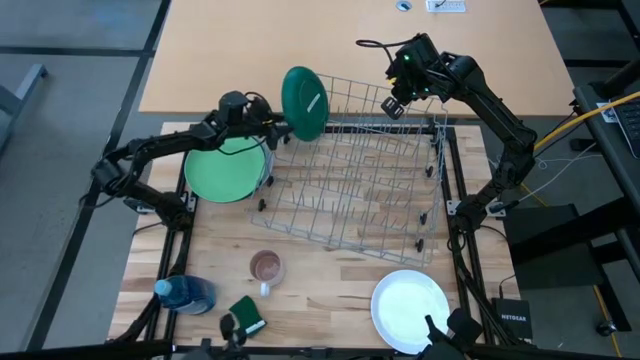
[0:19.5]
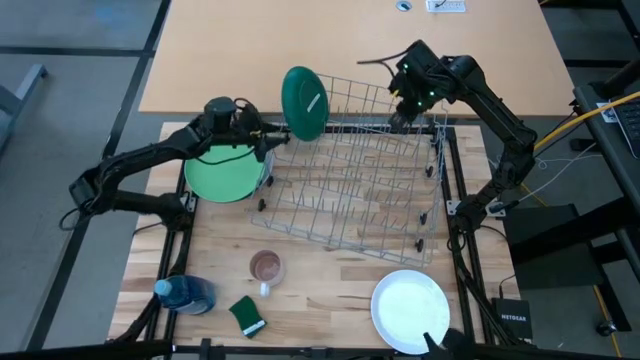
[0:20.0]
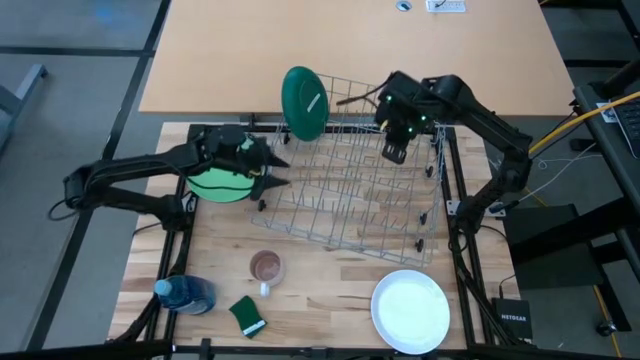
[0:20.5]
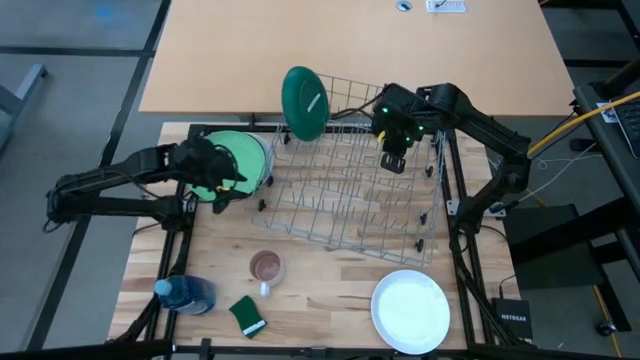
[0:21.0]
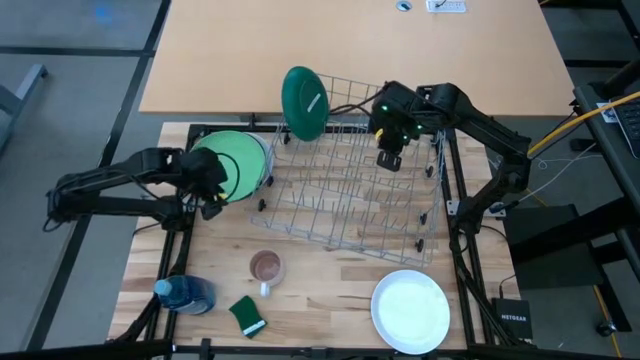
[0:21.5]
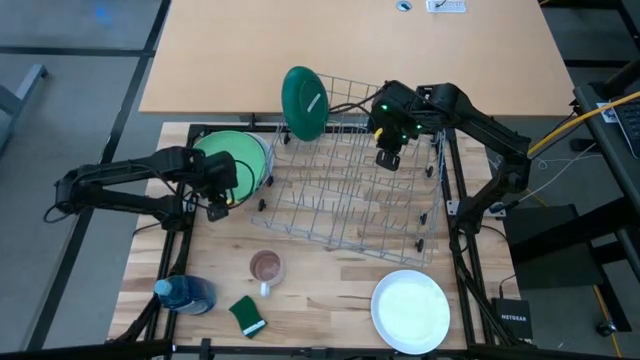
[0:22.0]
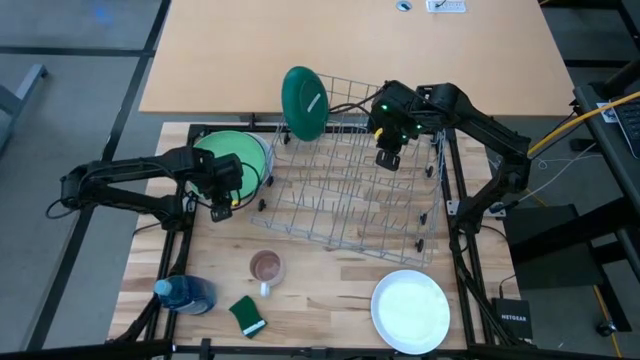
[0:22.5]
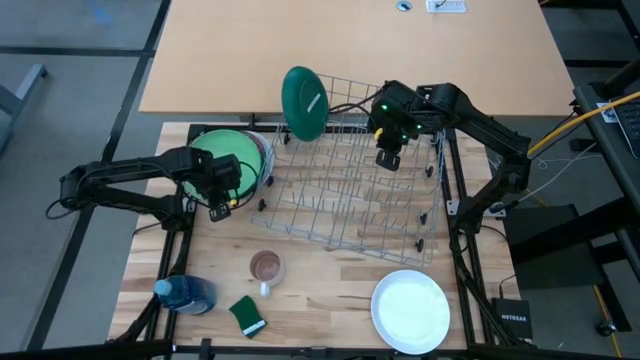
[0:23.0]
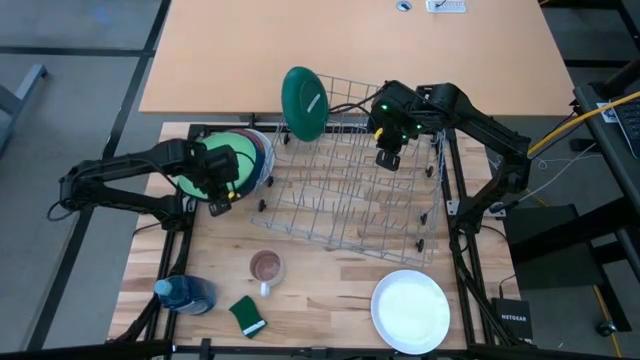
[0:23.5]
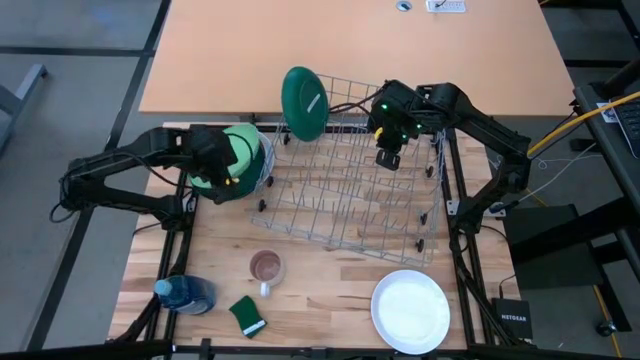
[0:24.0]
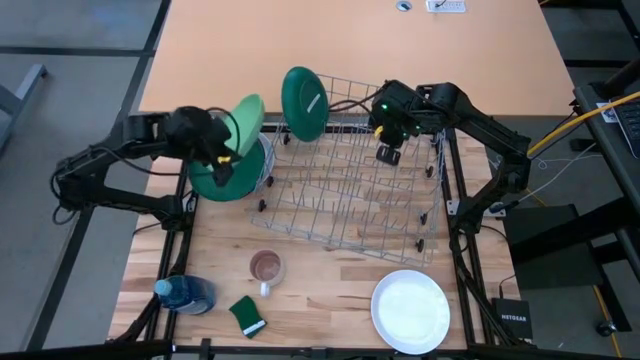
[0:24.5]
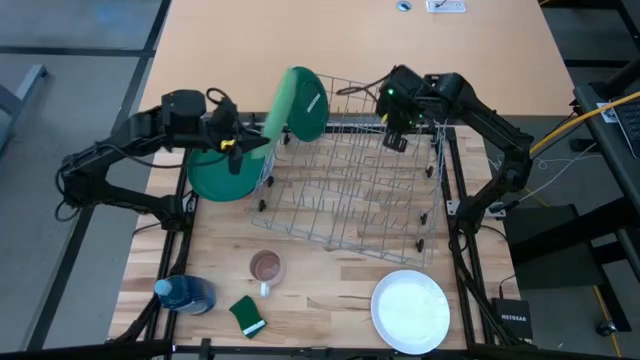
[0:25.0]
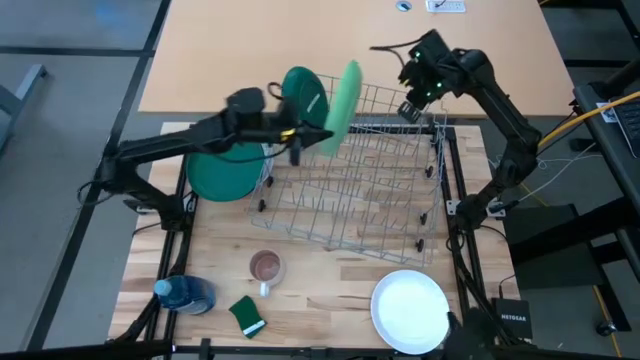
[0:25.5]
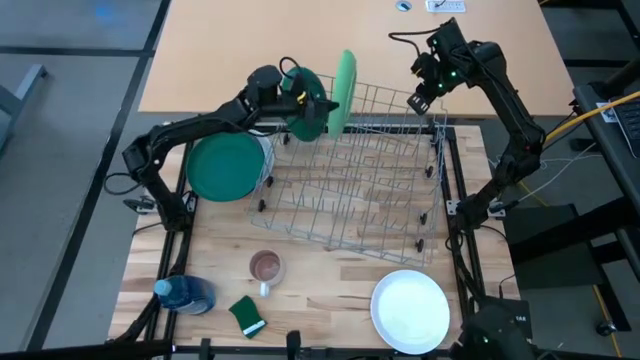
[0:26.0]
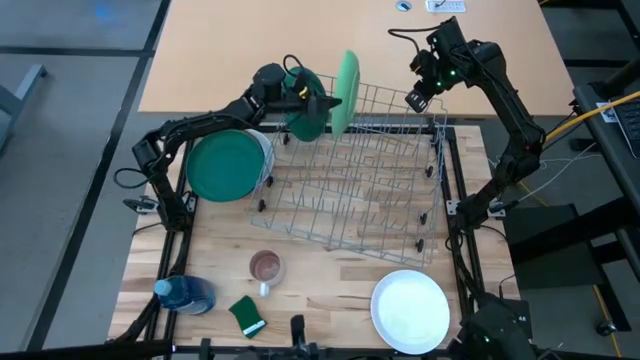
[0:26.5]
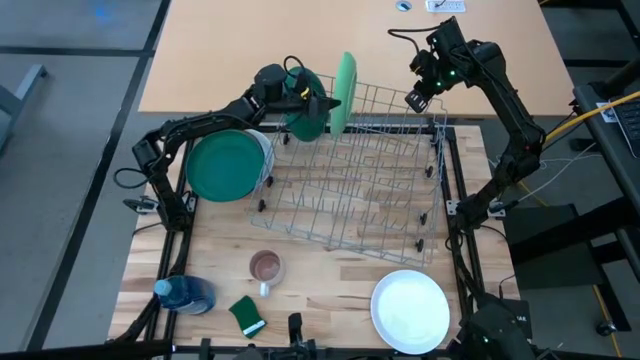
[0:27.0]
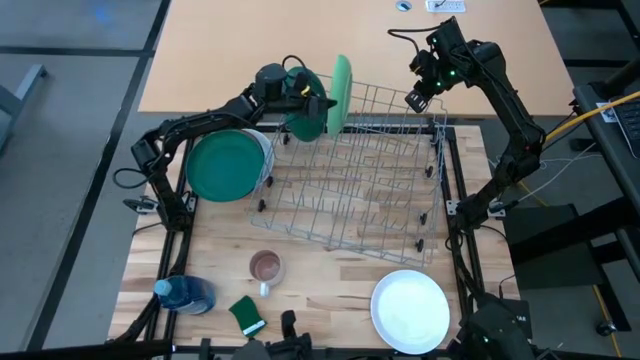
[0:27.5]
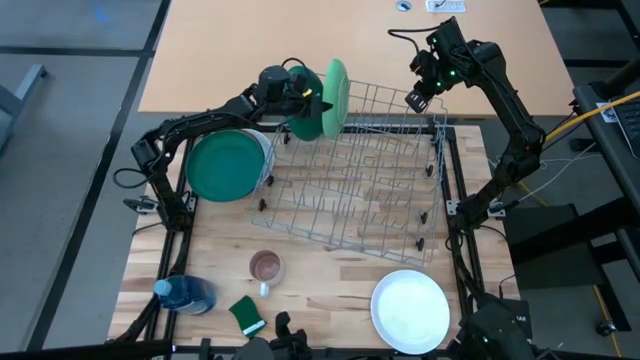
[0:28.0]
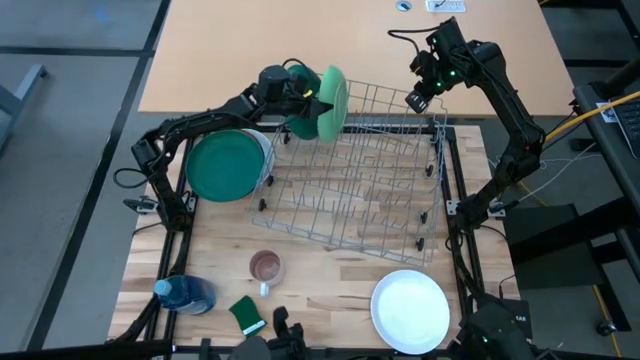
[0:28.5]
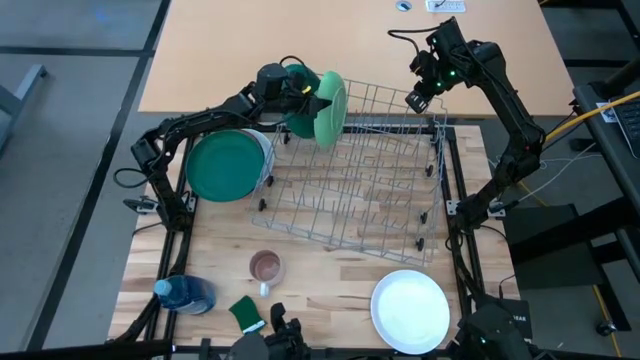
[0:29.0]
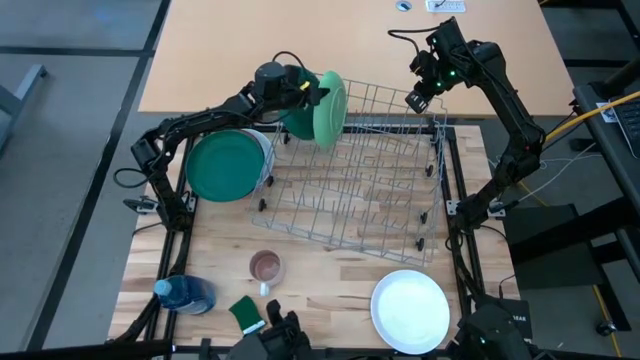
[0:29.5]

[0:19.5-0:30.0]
Task: Sort dishes
Put the light green plate into the dishwasher rack

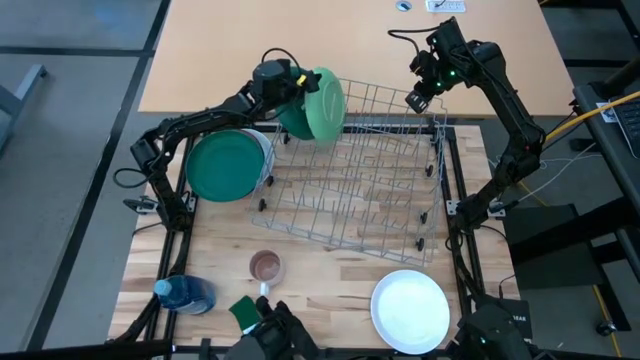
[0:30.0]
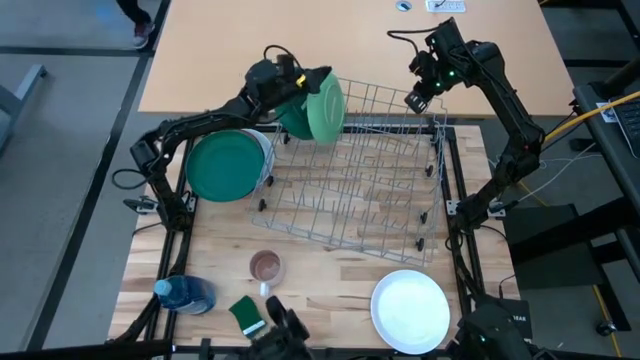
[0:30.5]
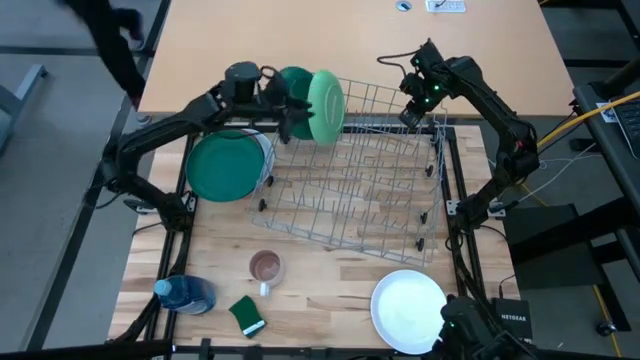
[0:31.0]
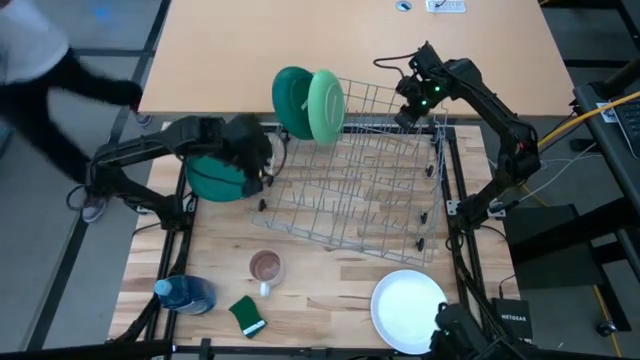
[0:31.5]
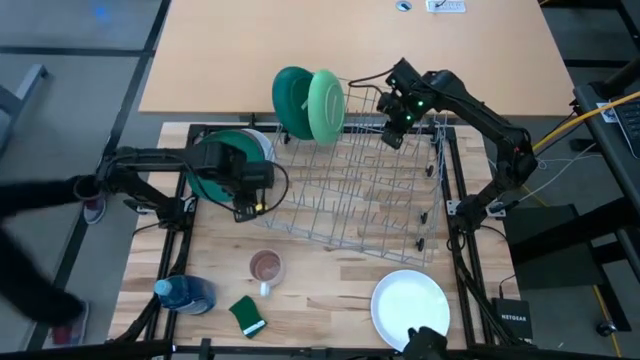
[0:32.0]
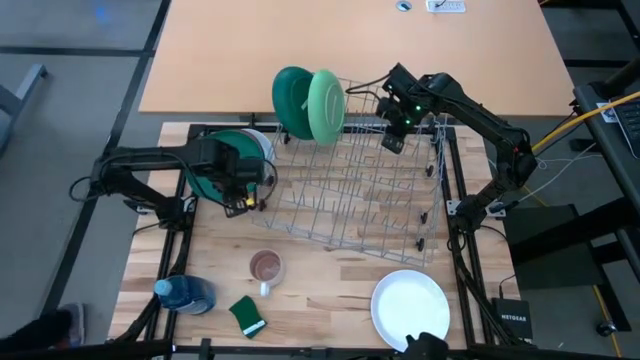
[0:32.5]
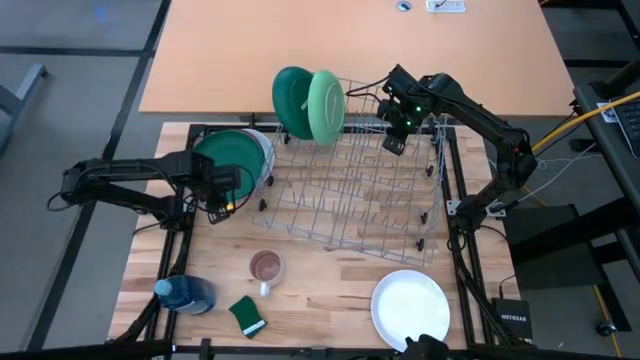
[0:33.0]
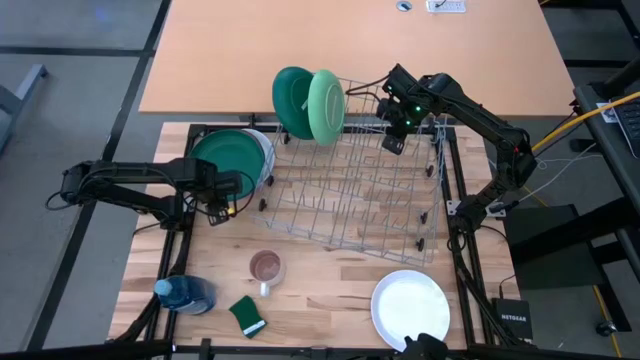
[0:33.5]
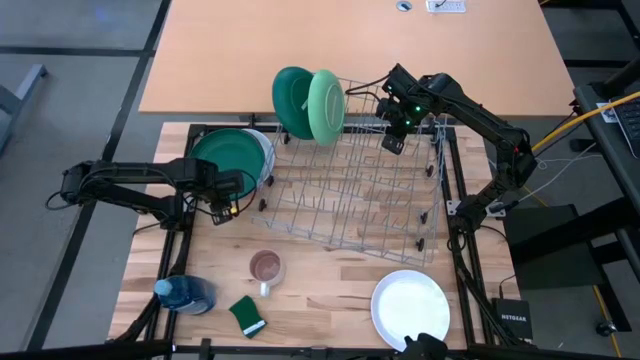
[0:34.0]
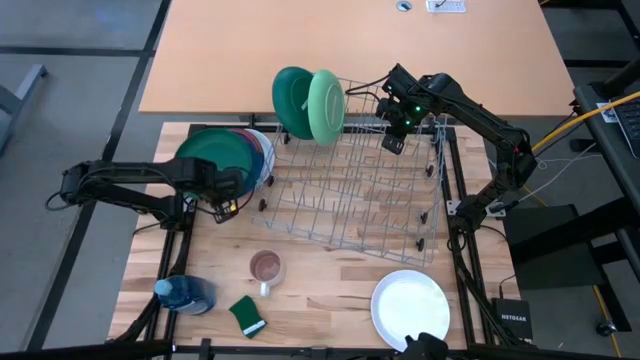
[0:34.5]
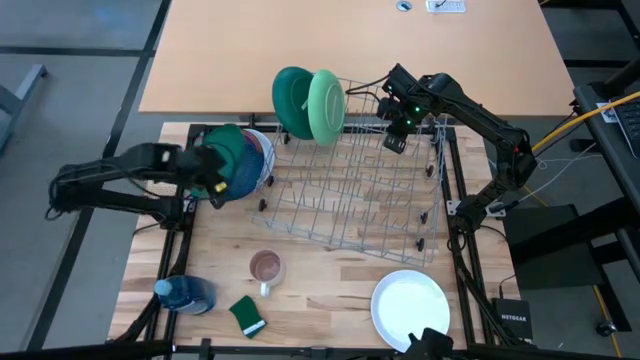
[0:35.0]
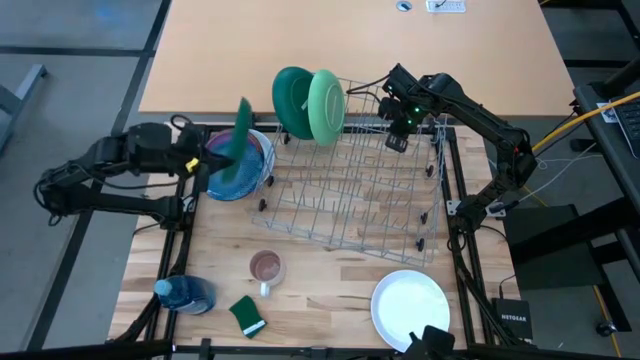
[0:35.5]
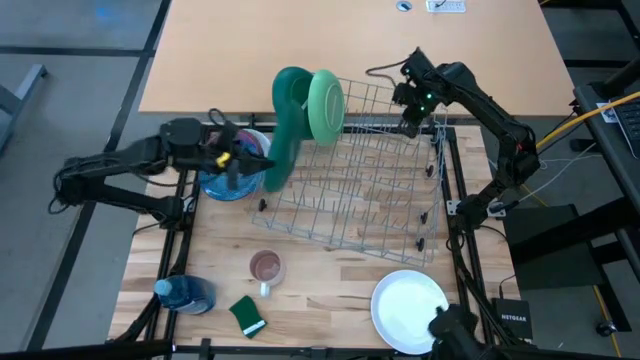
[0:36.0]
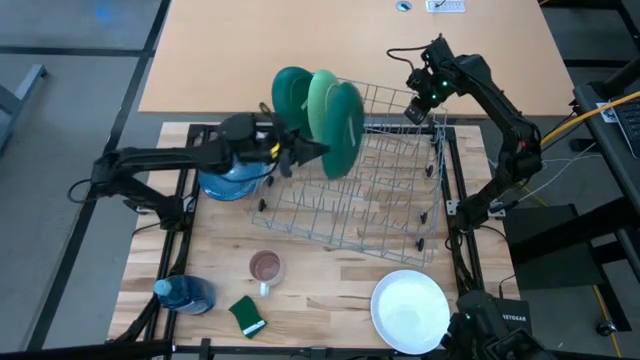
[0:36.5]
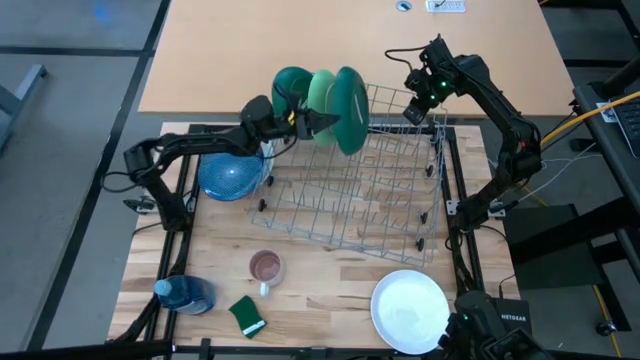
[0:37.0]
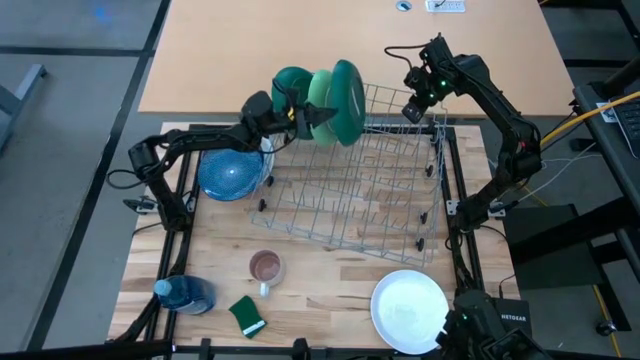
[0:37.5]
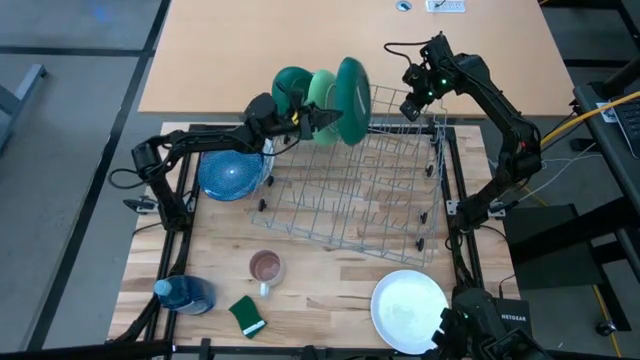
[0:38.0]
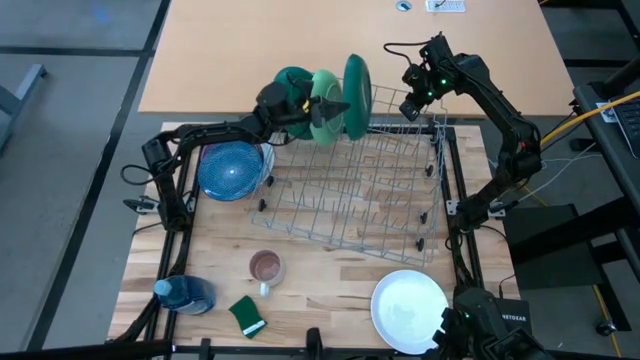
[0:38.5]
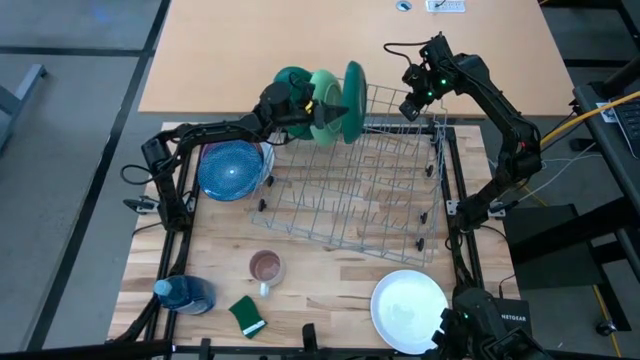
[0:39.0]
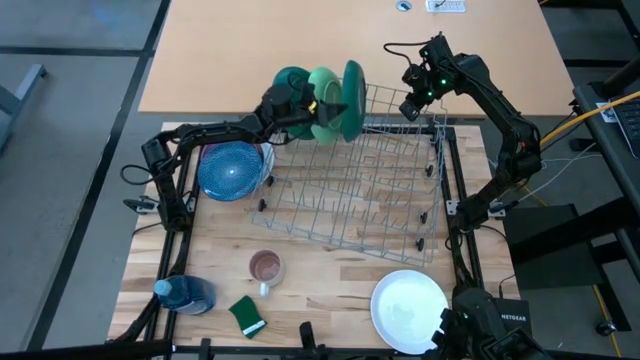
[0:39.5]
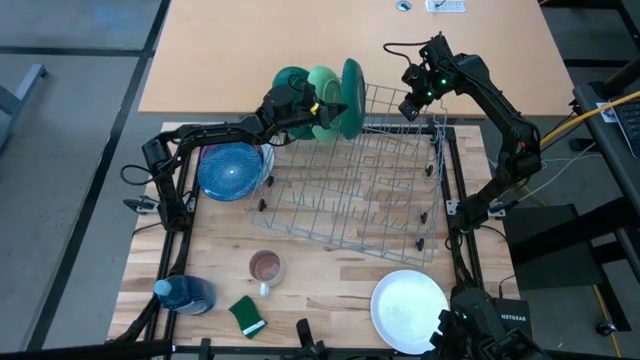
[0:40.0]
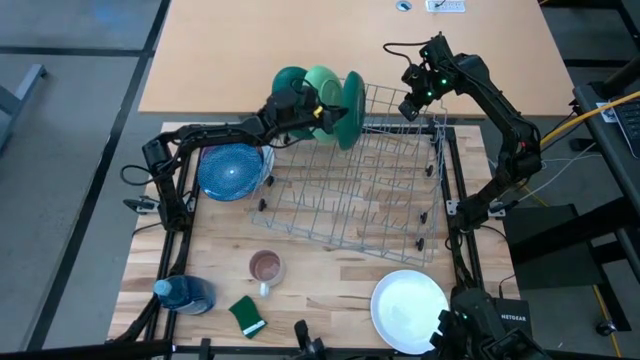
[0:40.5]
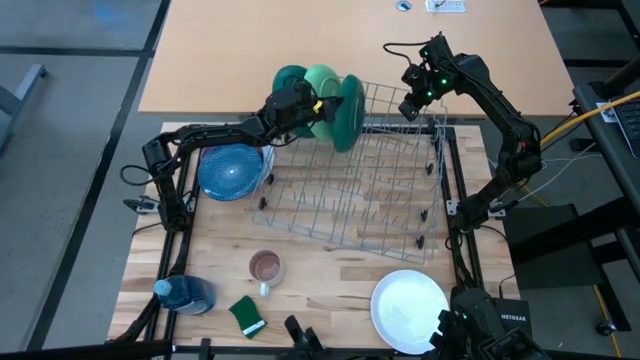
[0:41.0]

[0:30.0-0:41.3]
Put the green plate into the dishwasher rack
